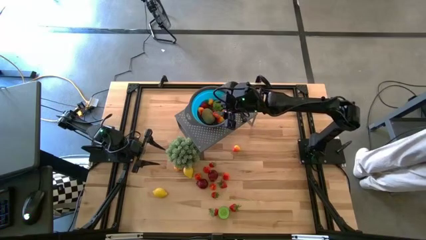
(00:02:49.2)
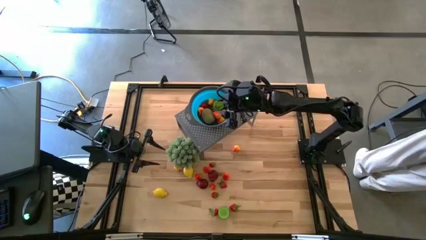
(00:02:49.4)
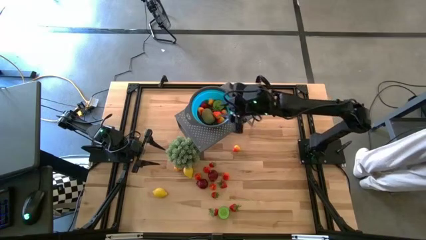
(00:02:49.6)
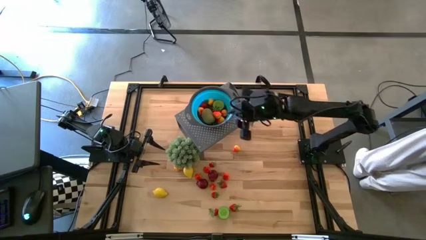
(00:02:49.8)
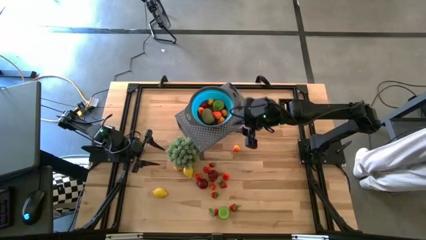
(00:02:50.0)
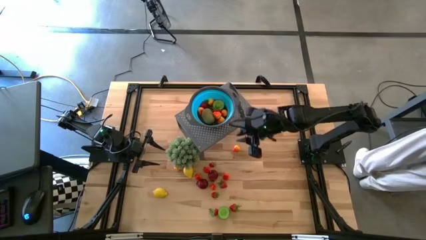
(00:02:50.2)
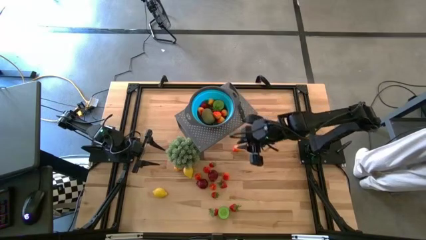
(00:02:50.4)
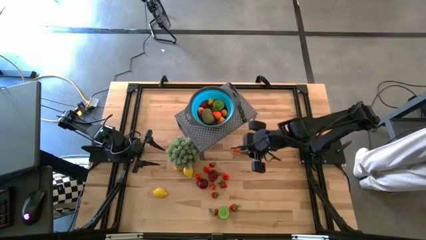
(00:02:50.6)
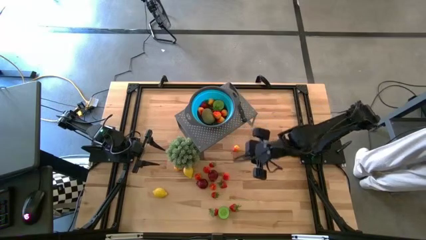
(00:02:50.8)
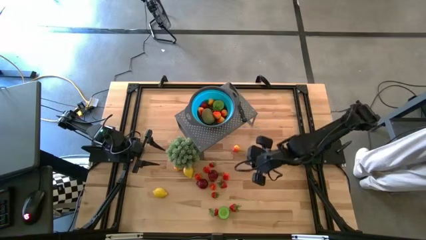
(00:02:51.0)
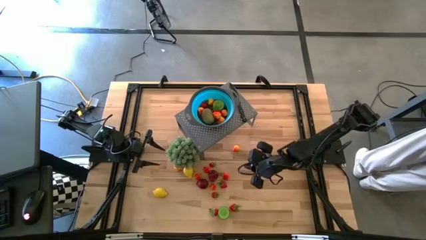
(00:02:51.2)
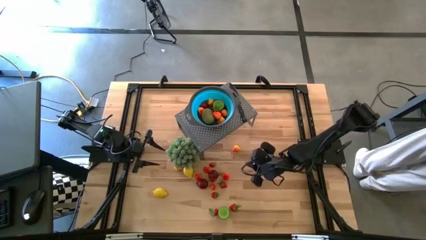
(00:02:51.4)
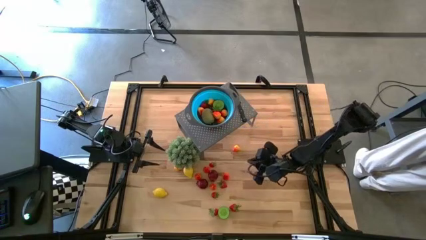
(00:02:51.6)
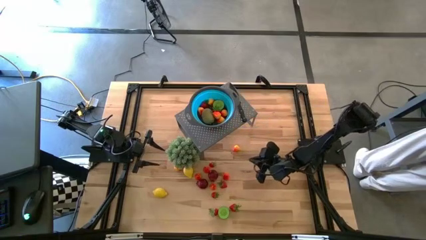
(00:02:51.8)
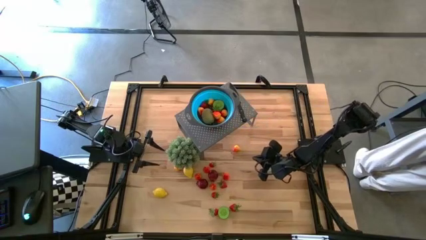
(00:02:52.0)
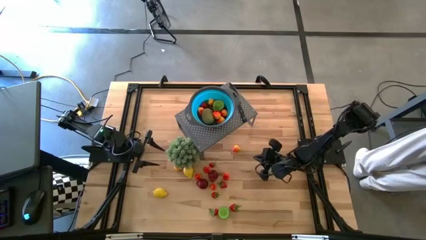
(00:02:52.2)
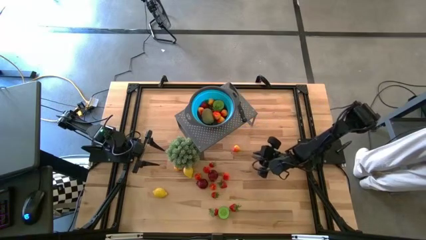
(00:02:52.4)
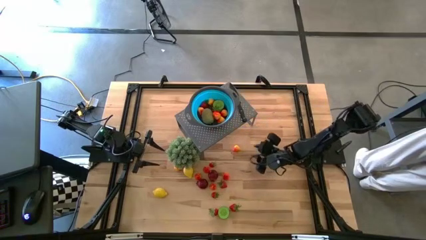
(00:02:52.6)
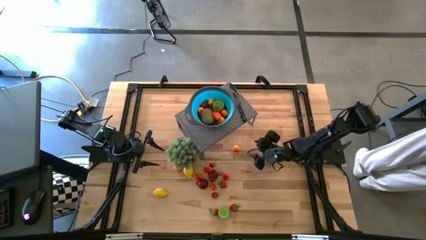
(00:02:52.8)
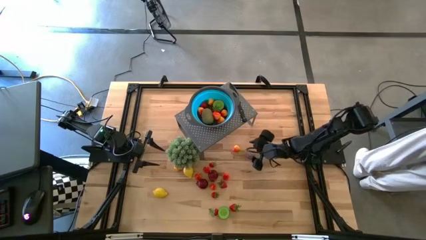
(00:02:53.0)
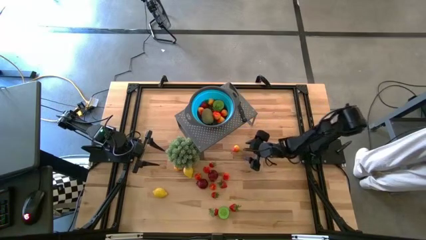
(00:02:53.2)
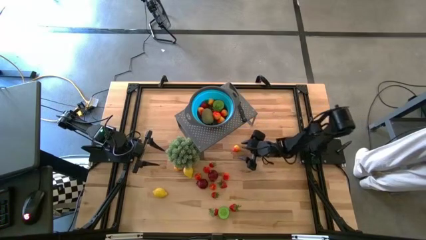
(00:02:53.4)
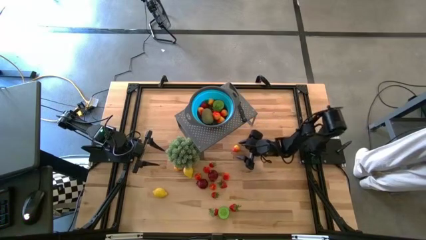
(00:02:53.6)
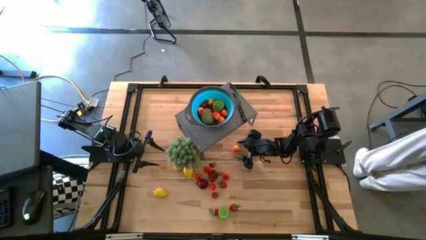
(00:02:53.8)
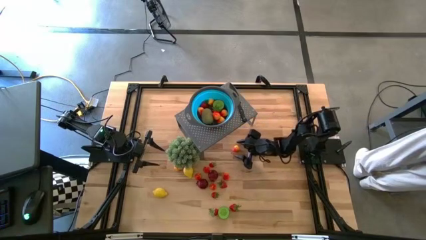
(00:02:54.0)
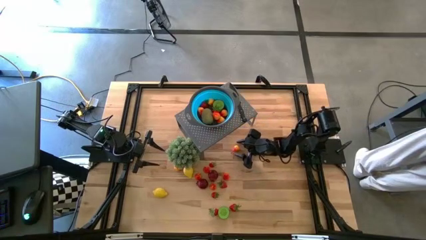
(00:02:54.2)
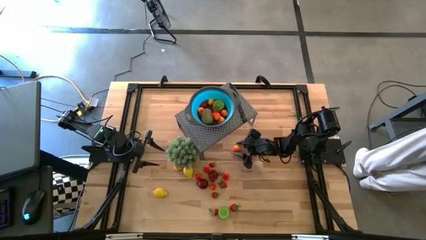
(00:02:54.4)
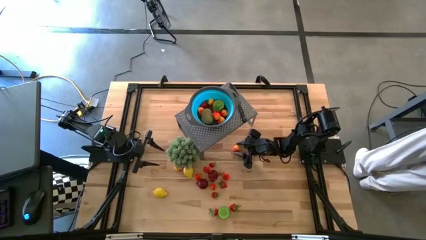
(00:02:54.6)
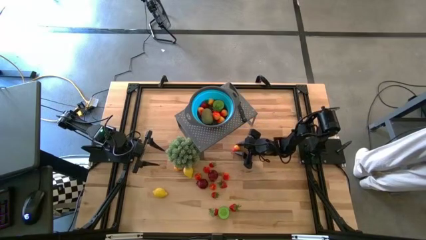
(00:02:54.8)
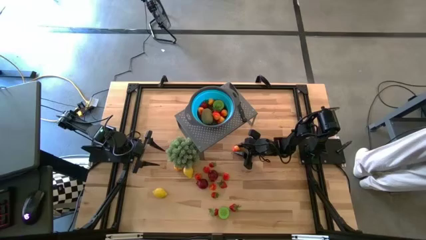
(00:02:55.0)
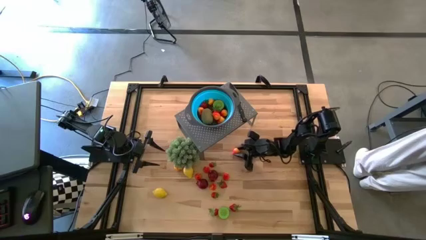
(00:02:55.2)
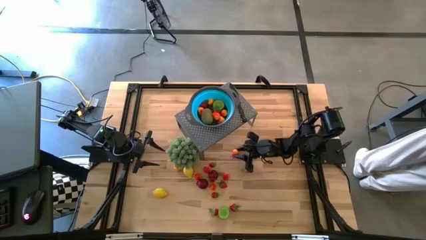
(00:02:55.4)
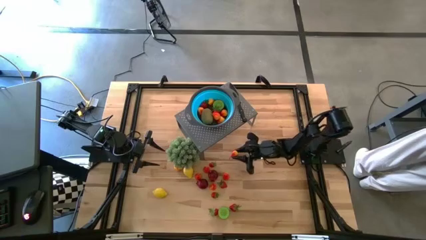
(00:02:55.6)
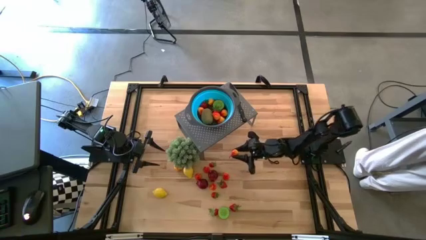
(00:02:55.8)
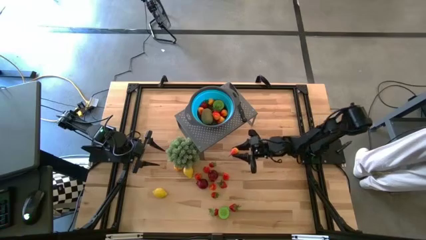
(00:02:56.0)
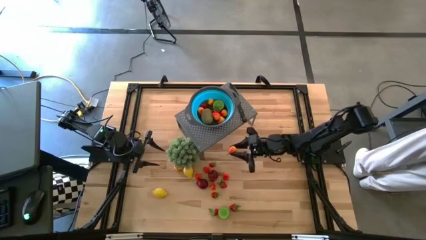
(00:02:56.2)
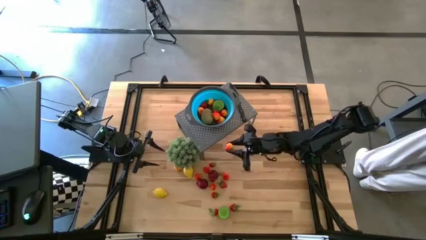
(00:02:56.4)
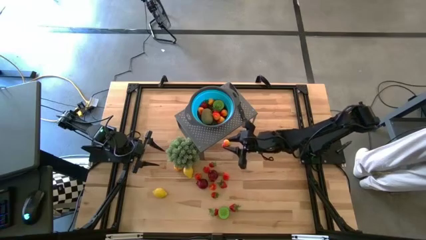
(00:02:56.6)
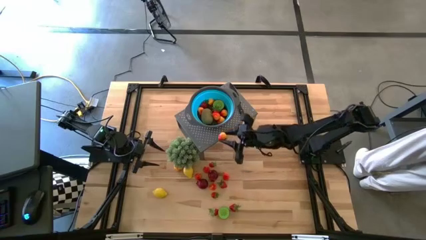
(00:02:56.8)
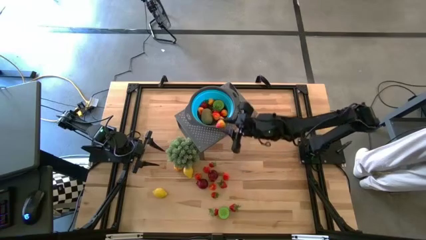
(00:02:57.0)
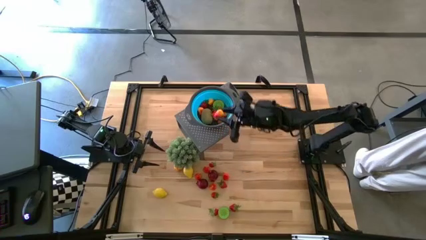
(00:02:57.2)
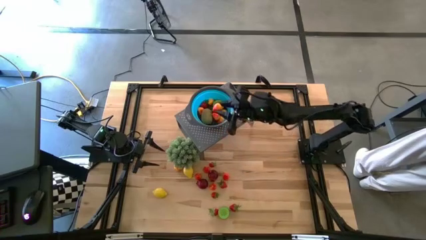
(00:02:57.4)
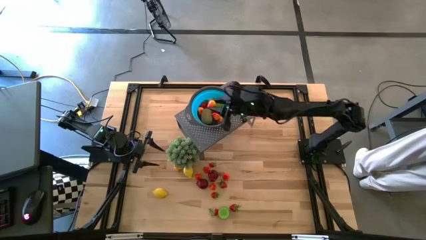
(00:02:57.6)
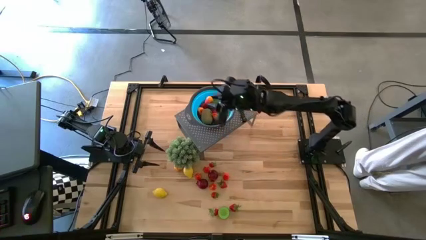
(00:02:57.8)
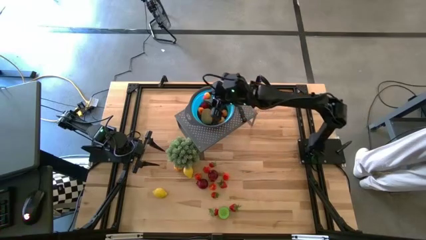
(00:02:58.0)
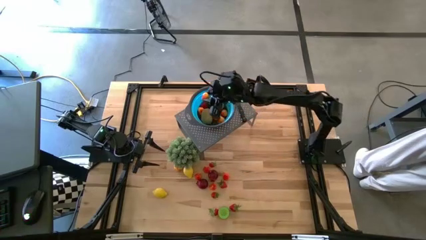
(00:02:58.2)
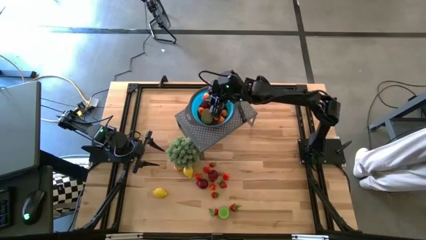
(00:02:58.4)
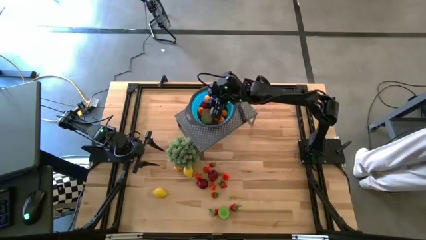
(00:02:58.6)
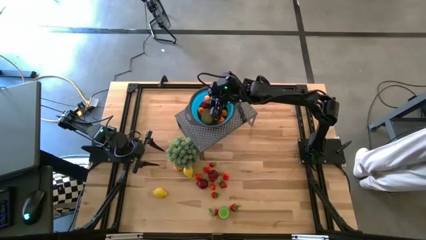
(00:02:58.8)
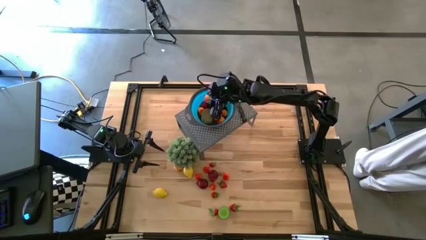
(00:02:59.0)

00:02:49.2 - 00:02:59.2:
Task: Pick & Place Fruit
Put the pear into the blue strainer bowl on the shelf
